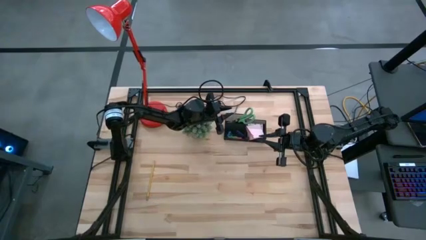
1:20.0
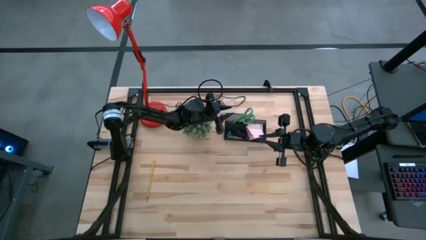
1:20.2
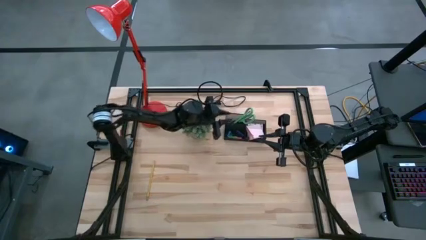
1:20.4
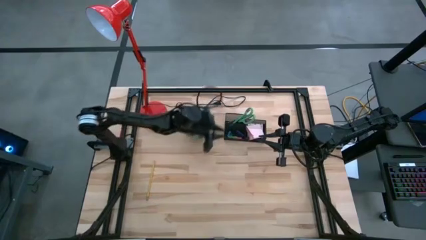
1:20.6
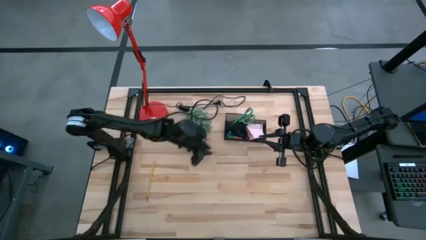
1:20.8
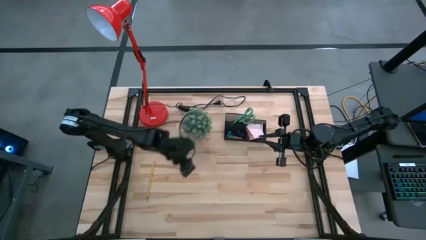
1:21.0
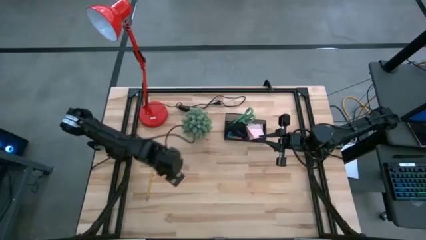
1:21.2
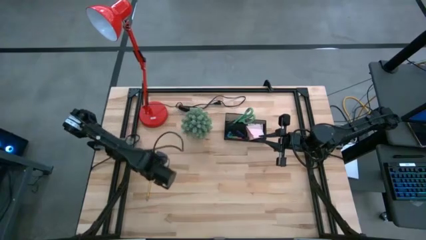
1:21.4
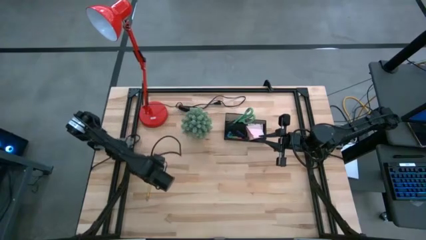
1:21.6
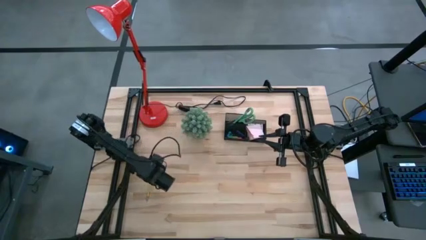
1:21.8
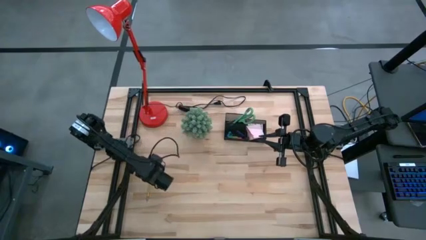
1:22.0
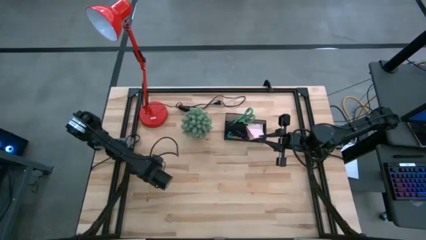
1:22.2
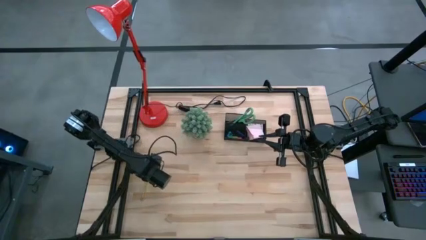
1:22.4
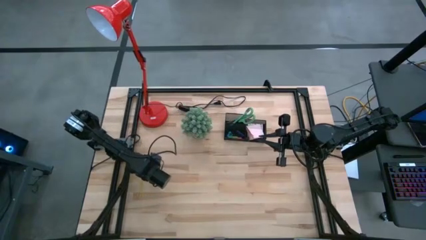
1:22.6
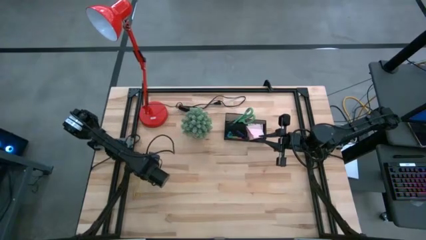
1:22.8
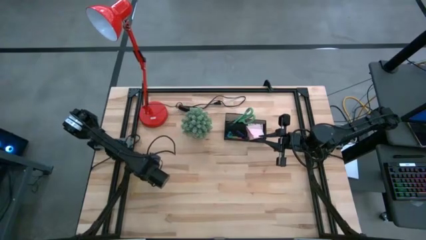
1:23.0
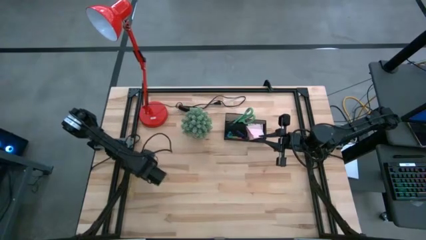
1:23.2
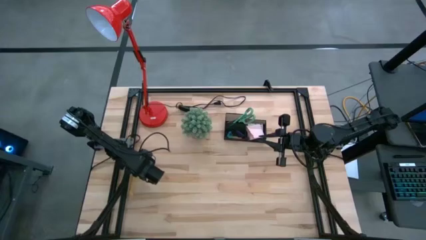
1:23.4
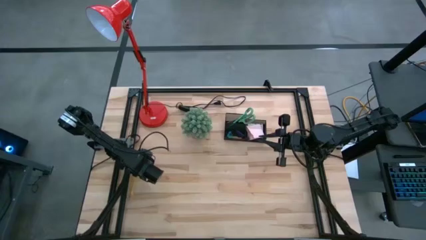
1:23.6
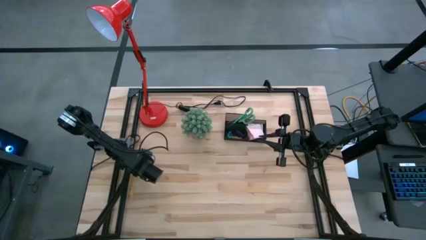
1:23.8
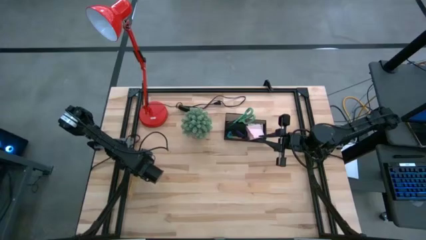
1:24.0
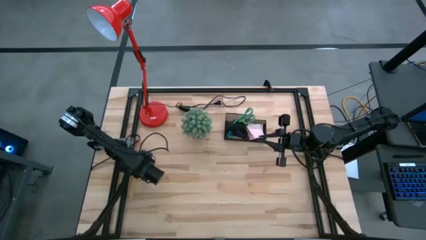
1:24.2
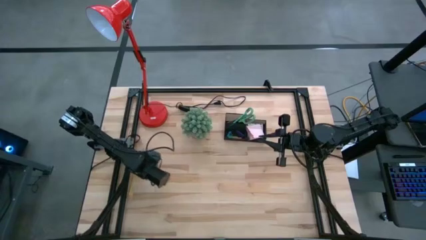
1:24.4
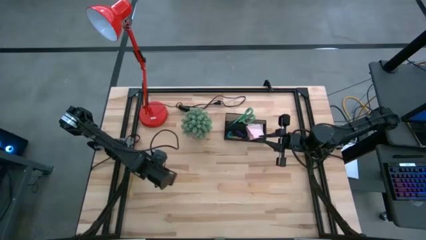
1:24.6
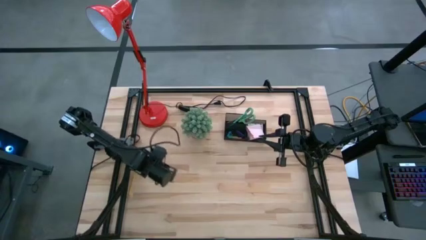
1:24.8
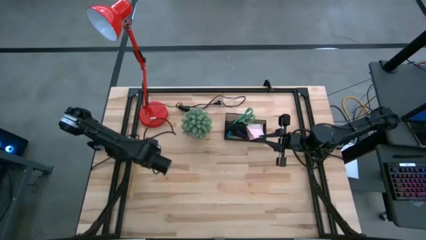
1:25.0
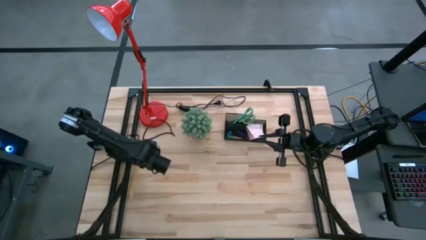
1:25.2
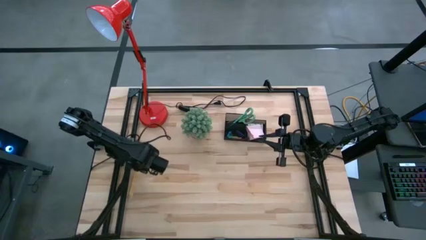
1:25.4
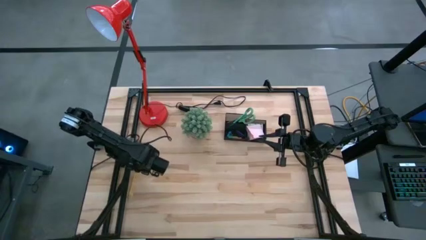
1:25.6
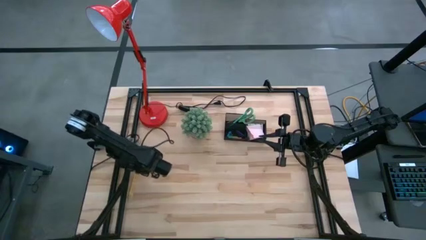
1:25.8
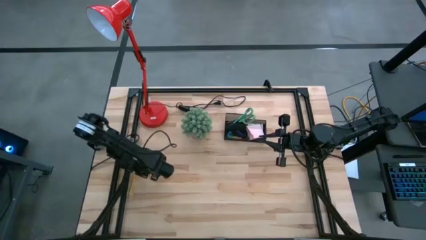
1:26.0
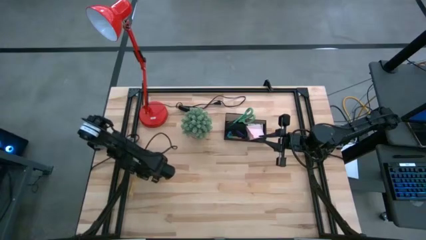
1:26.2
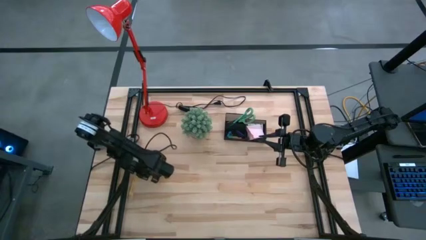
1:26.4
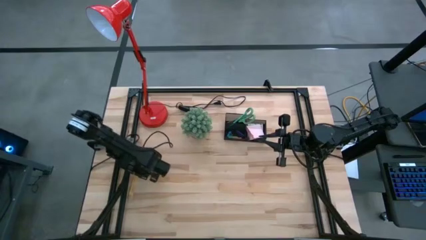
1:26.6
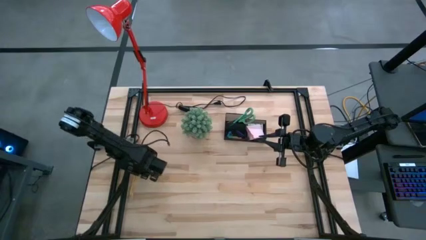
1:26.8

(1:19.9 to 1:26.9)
Task: Pick and place office supplies into organizer
Put the yellow pencil into the black desk organizer

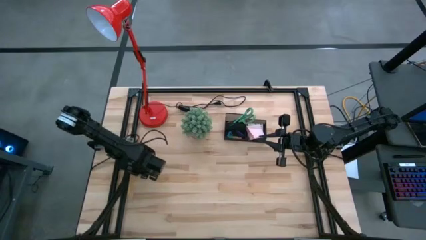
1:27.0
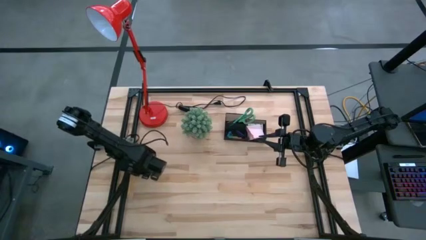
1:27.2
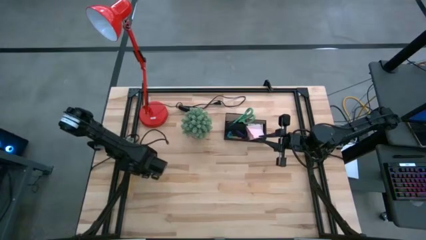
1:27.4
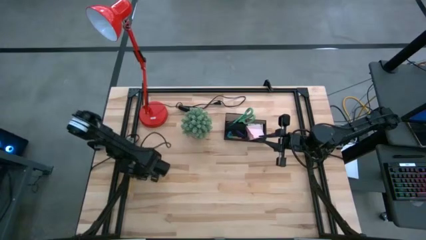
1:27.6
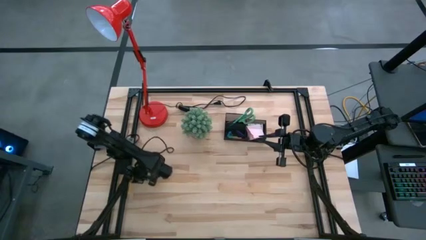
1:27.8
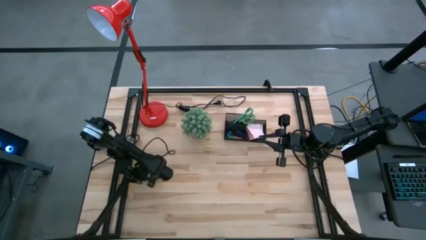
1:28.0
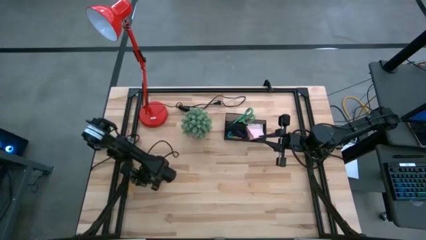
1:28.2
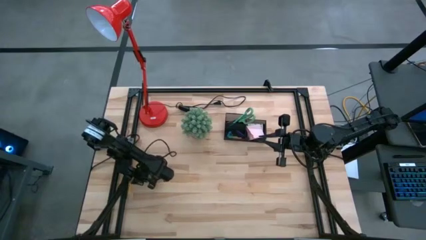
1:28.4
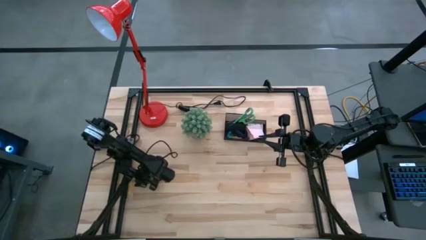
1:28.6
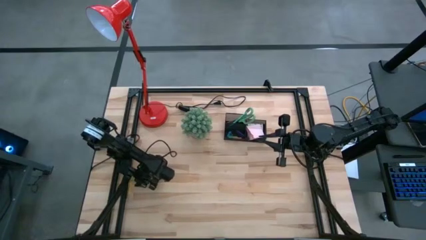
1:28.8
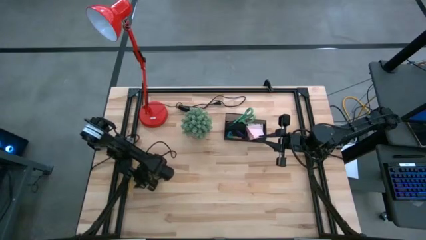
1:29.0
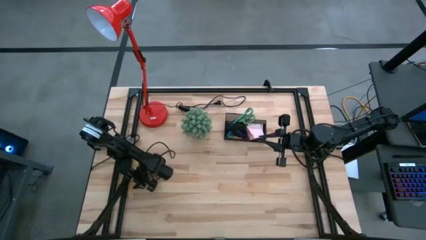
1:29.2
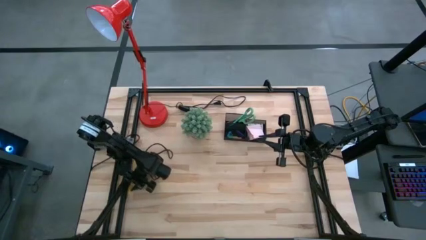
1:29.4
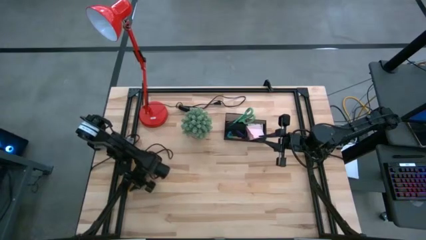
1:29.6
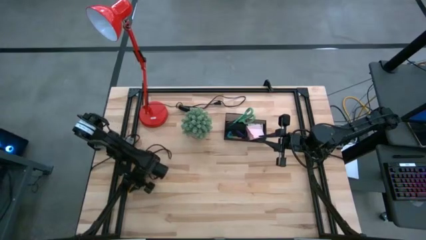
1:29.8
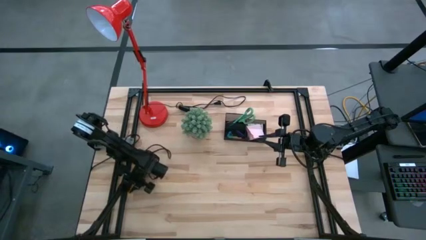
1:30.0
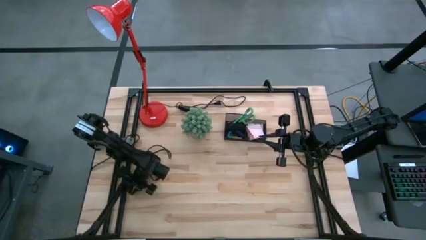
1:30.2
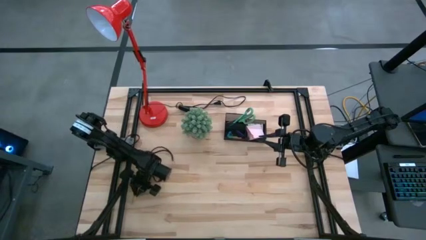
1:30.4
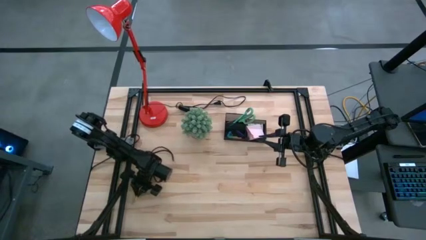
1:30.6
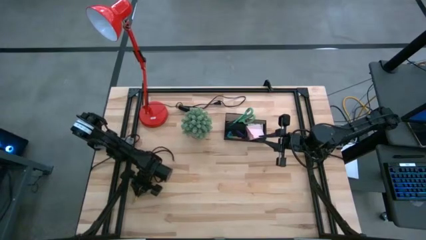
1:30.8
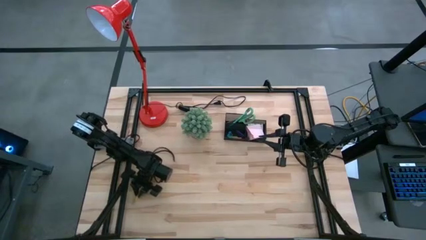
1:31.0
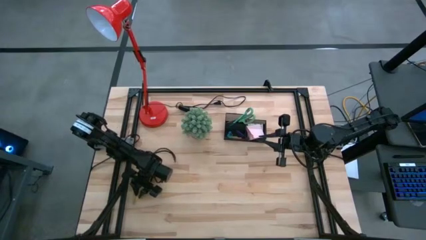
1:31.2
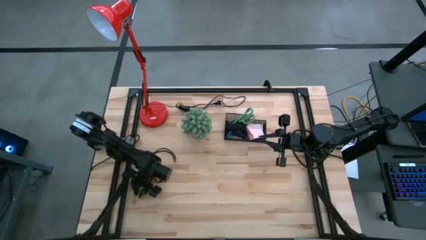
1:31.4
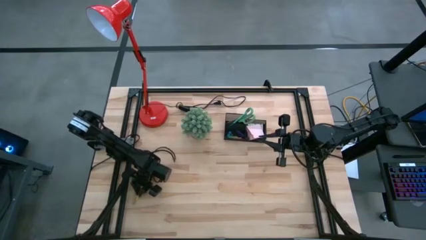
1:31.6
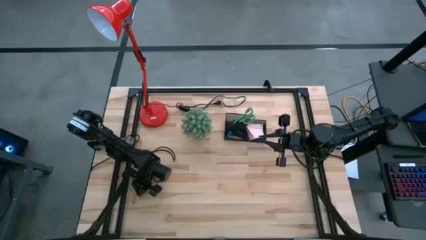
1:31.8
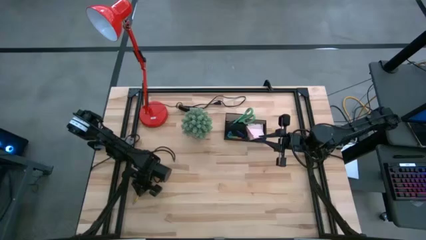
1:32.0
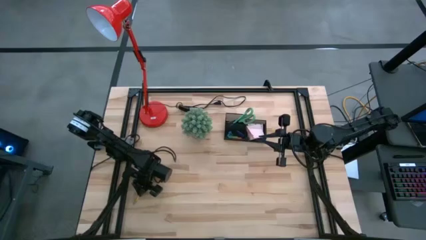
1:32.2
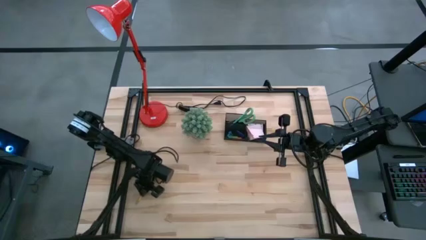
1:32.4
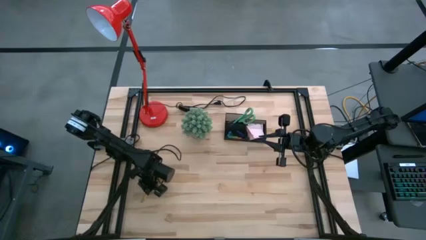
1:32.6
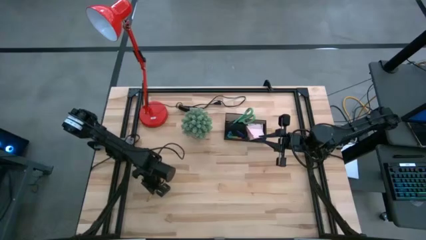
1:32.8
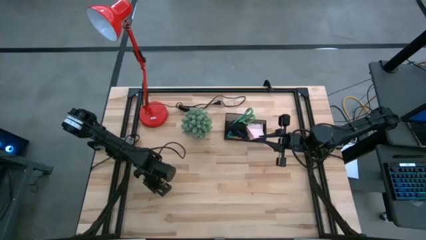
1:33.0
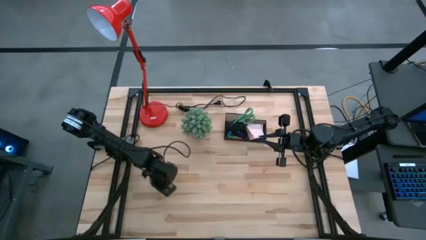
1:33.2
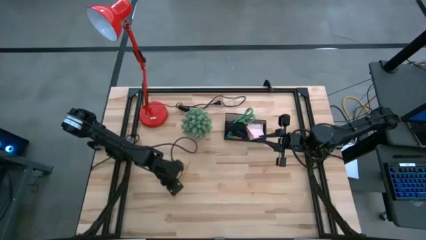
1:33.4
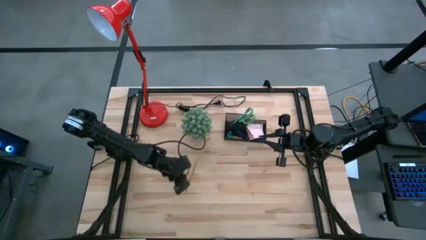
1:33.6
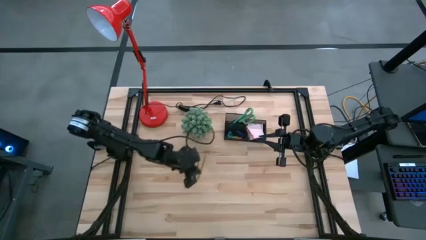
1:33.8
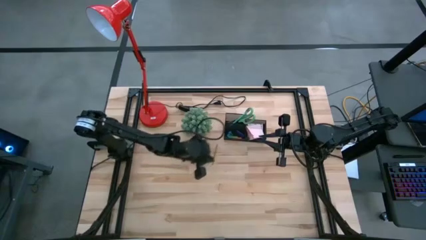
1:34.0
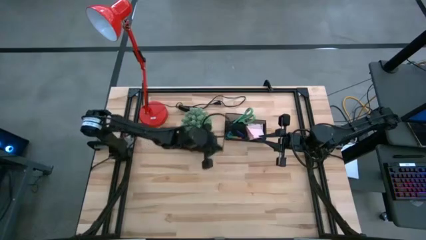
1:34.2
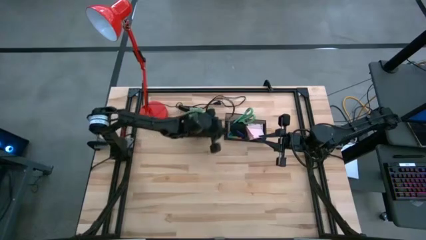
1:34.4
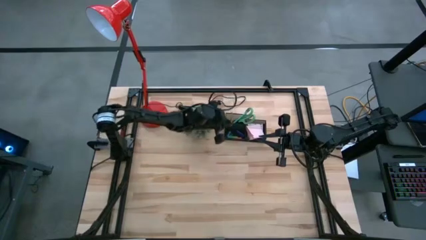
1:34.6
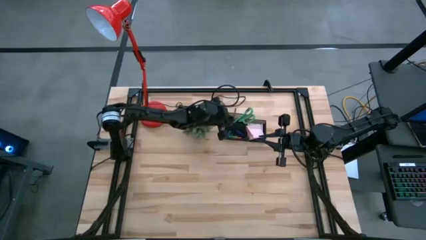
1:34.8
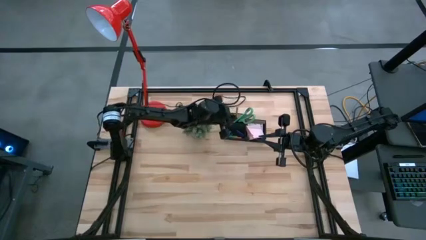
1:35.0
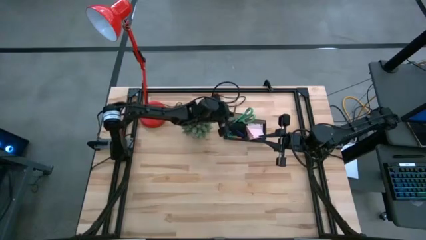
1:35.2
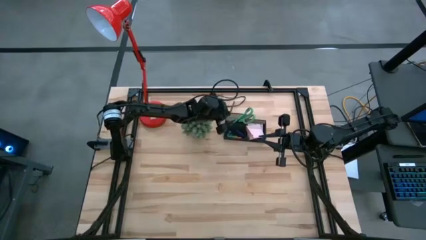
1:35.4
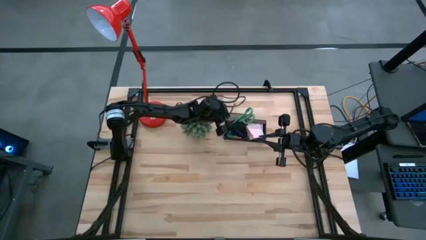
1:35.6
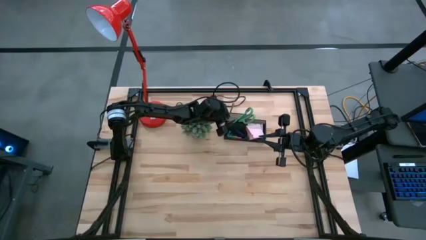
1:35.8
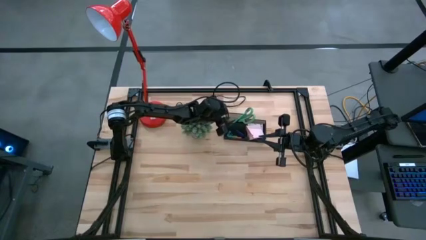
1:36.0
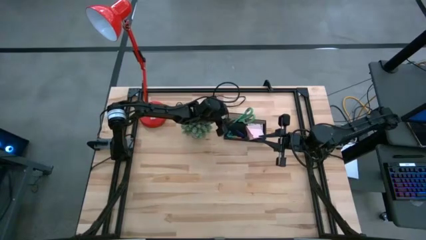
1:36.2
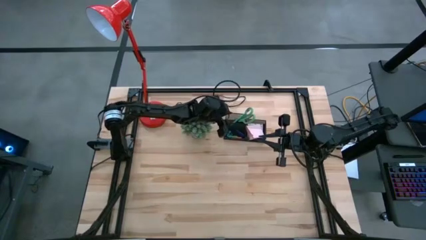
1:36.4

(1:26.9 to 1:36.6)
Put the yellow pencil into the black desk organizer
